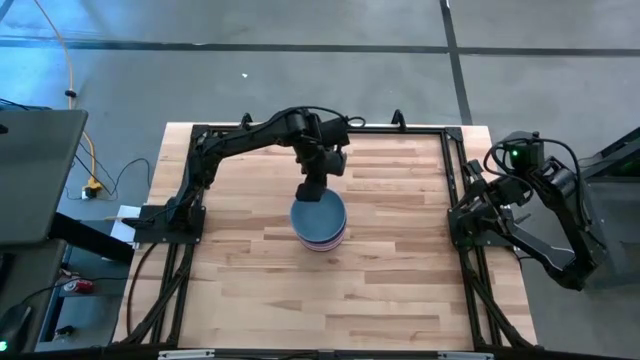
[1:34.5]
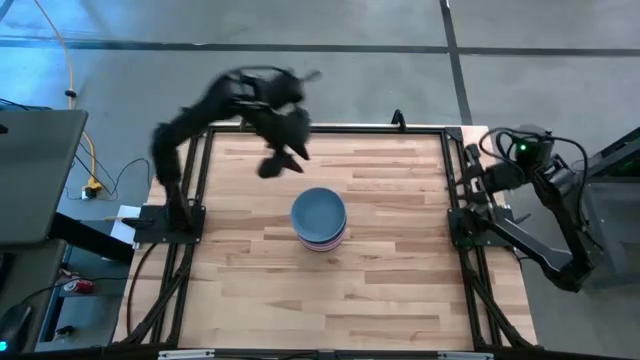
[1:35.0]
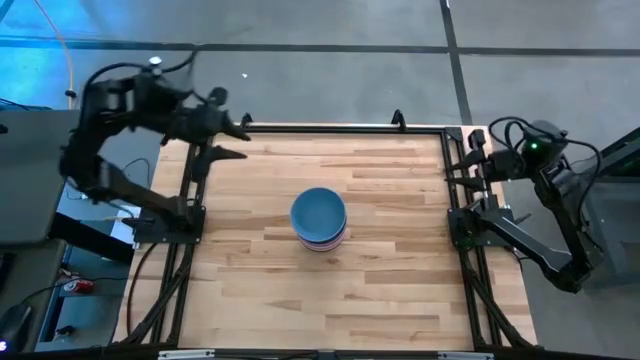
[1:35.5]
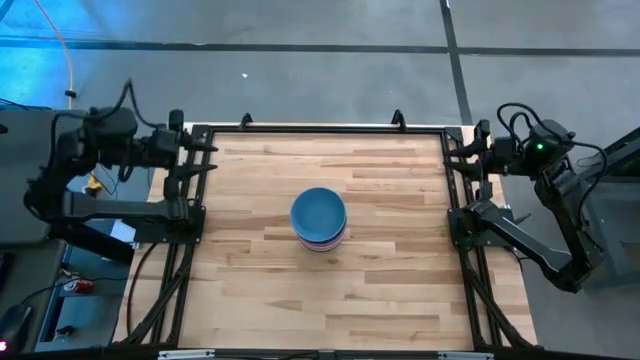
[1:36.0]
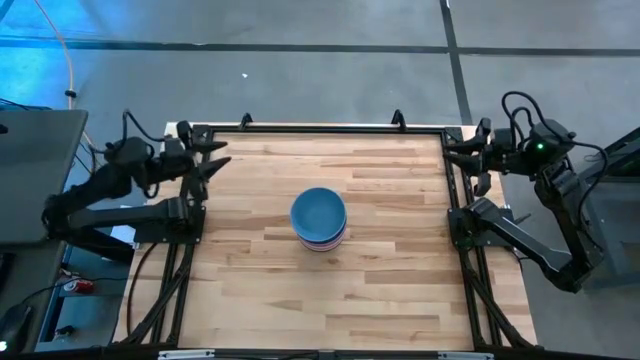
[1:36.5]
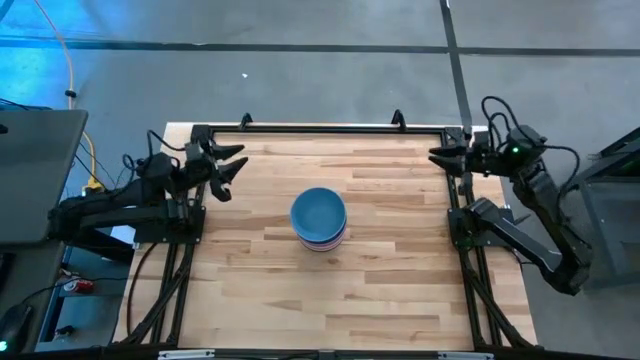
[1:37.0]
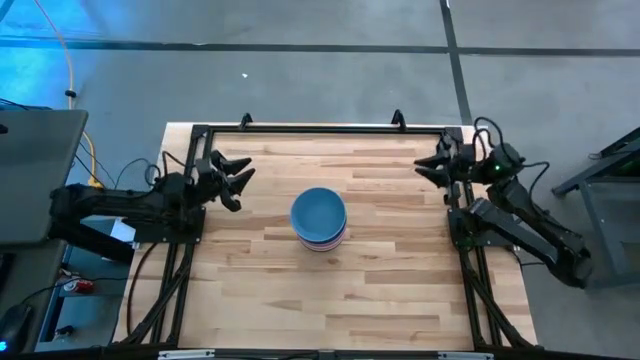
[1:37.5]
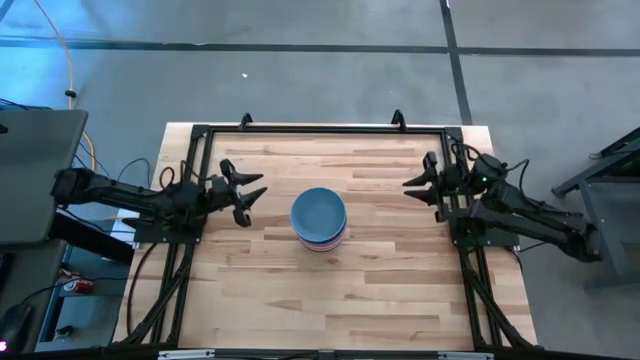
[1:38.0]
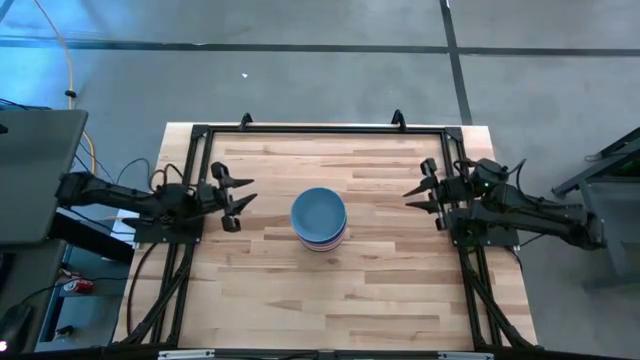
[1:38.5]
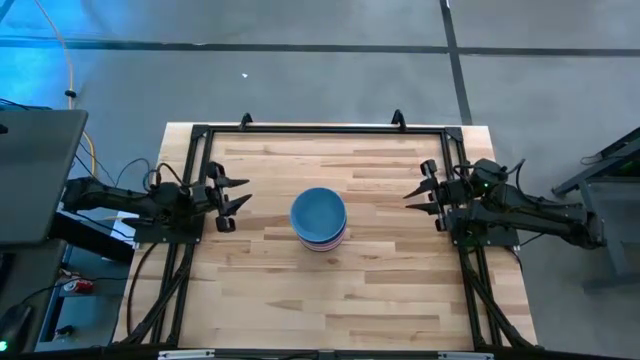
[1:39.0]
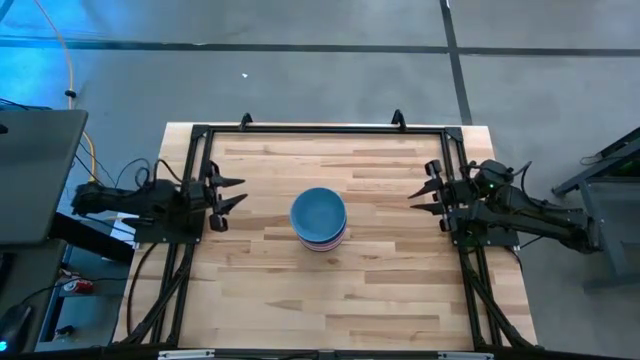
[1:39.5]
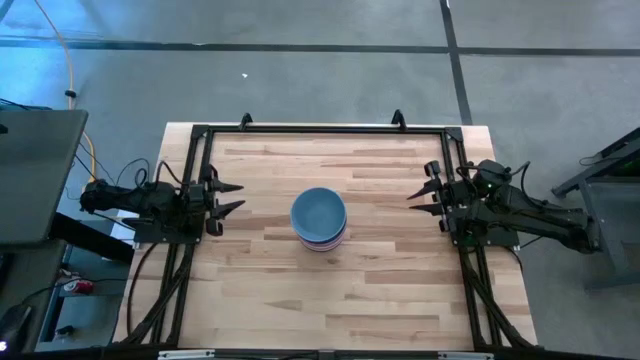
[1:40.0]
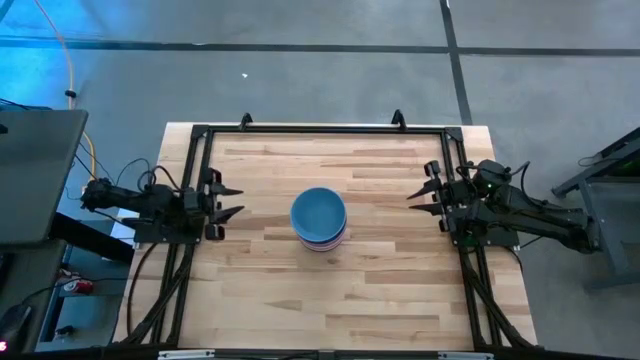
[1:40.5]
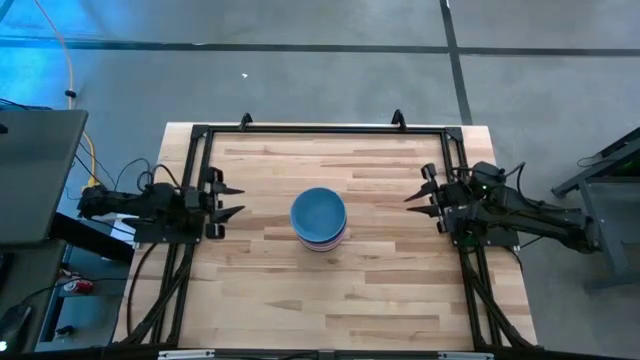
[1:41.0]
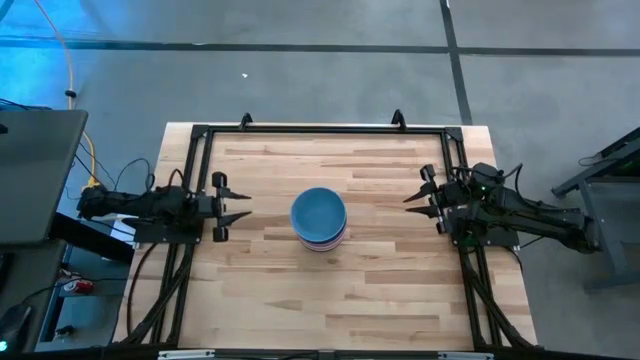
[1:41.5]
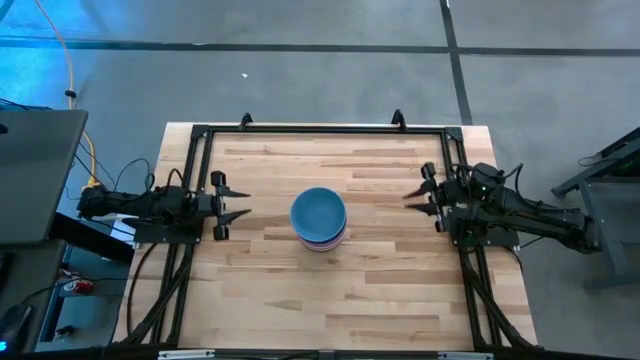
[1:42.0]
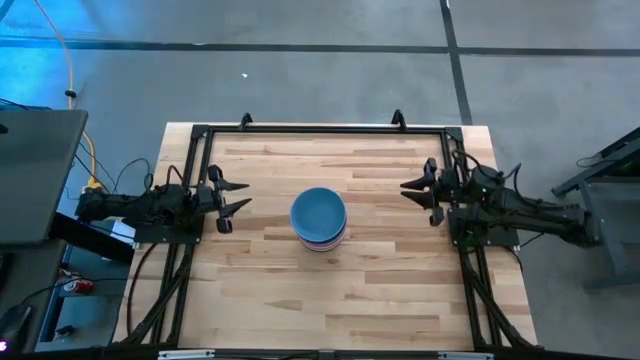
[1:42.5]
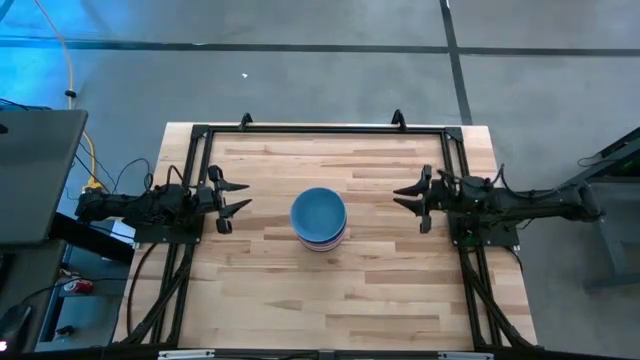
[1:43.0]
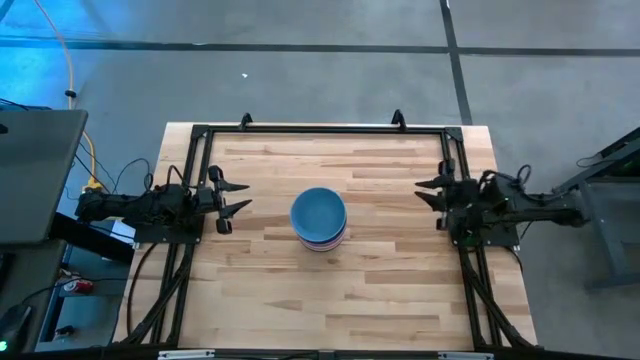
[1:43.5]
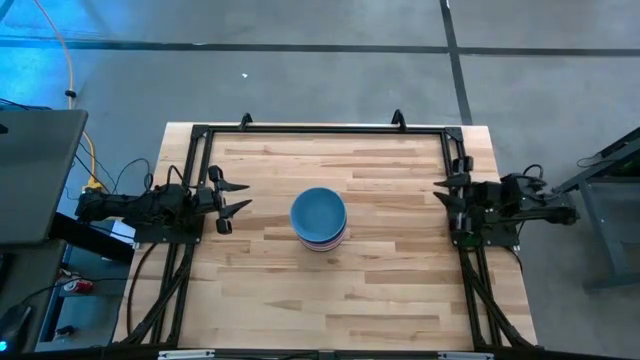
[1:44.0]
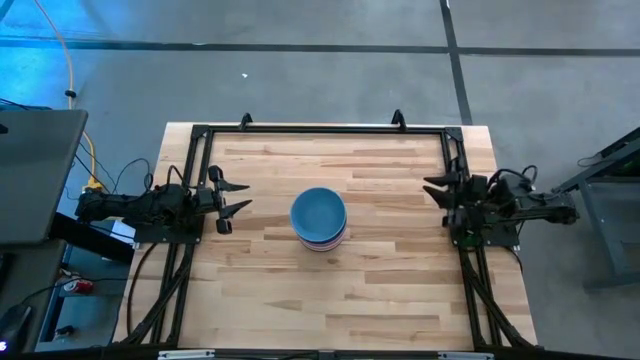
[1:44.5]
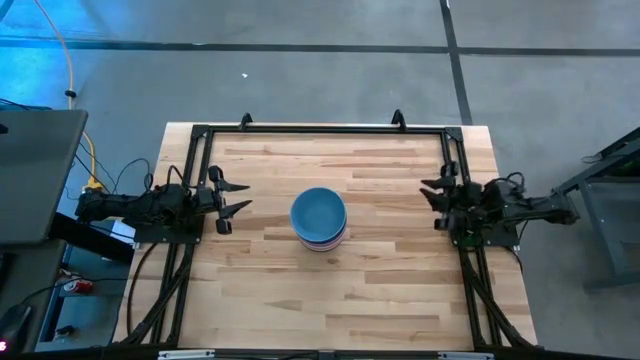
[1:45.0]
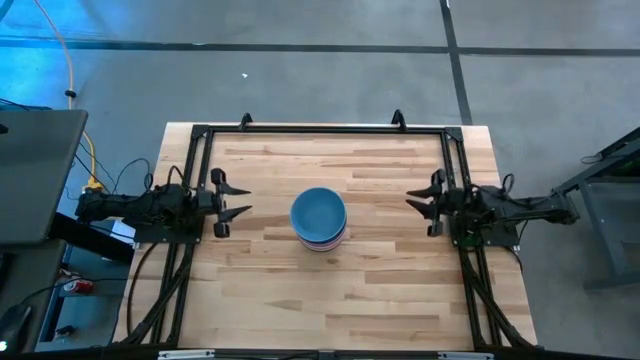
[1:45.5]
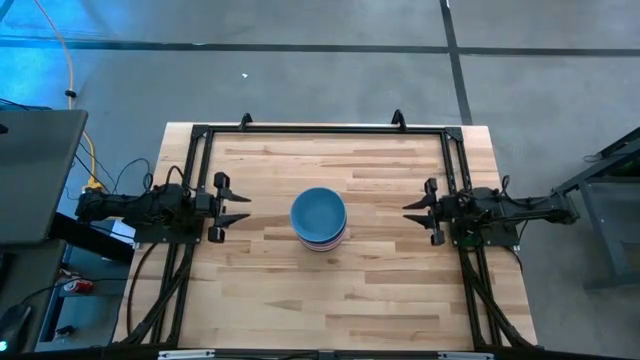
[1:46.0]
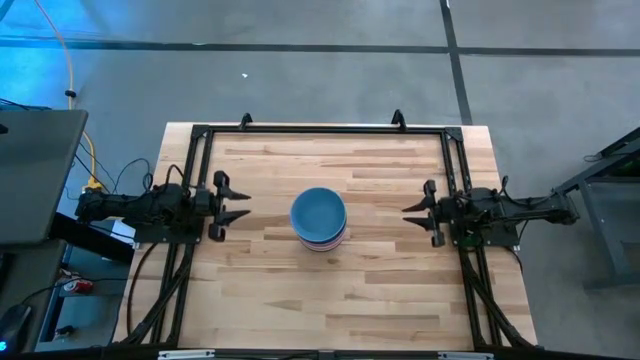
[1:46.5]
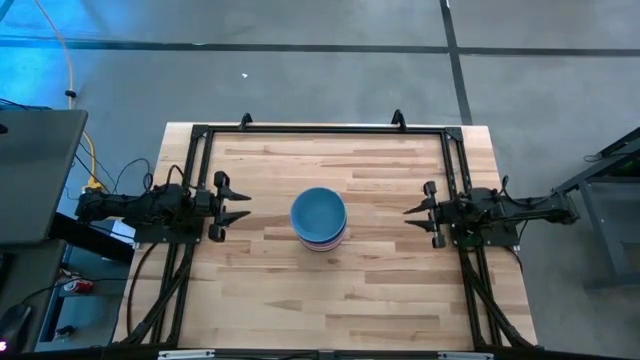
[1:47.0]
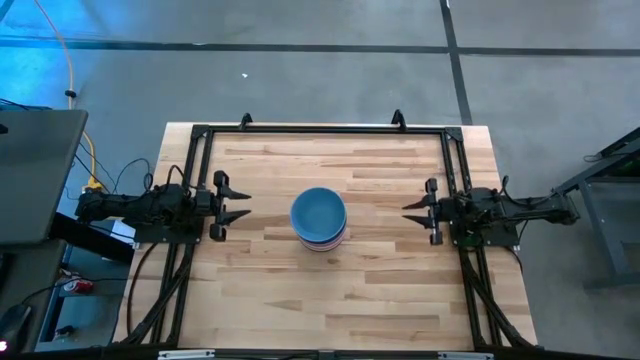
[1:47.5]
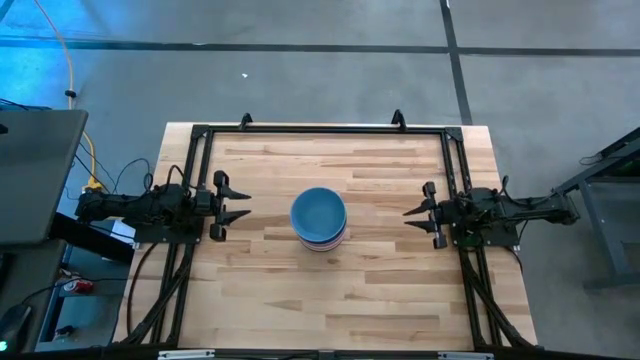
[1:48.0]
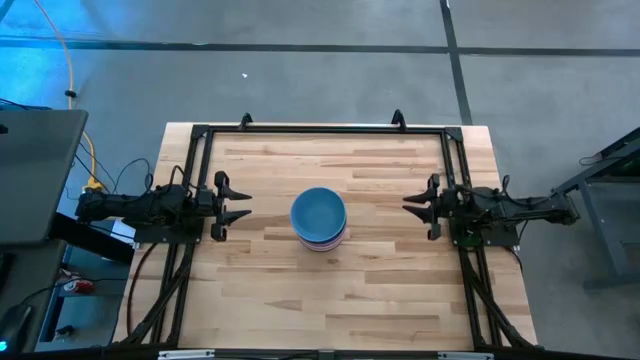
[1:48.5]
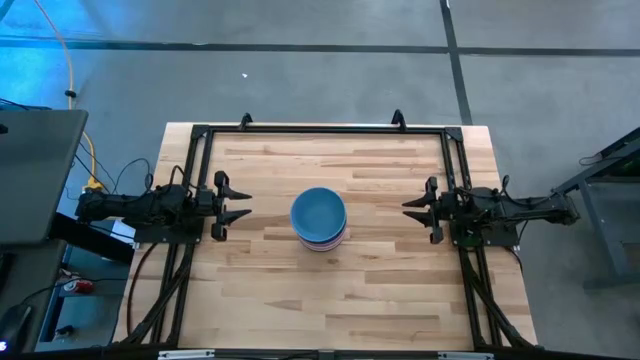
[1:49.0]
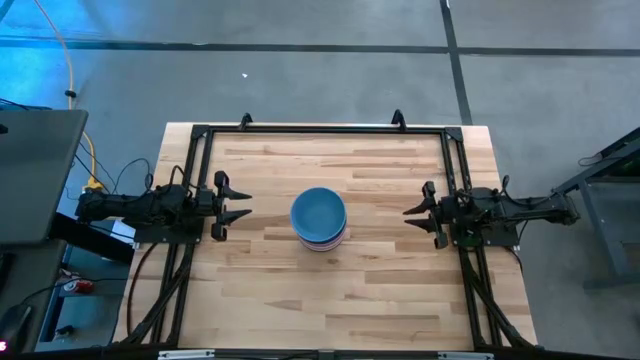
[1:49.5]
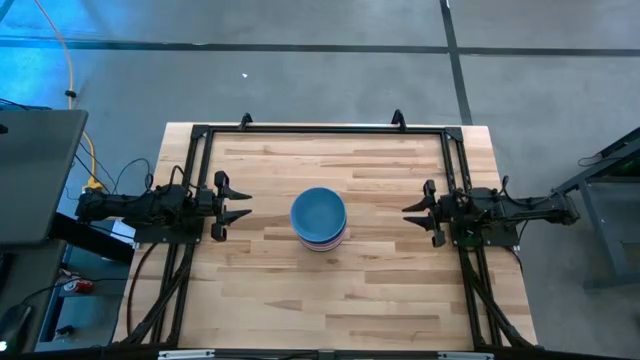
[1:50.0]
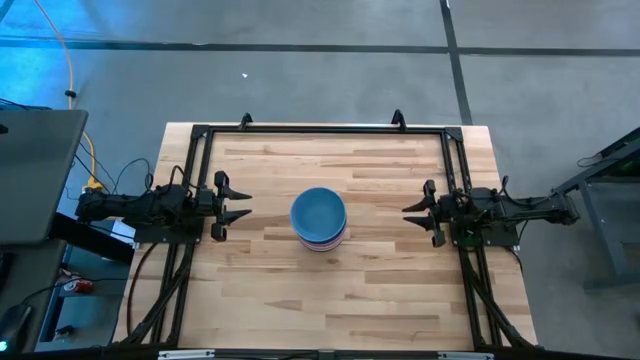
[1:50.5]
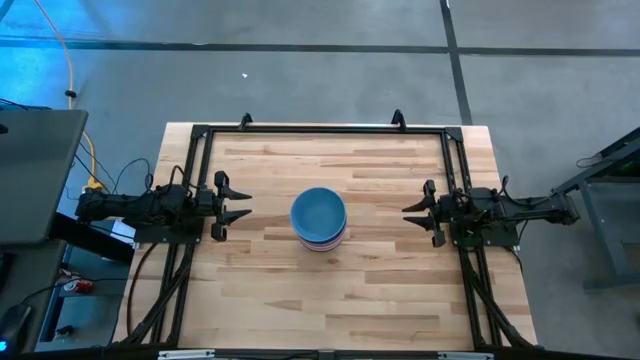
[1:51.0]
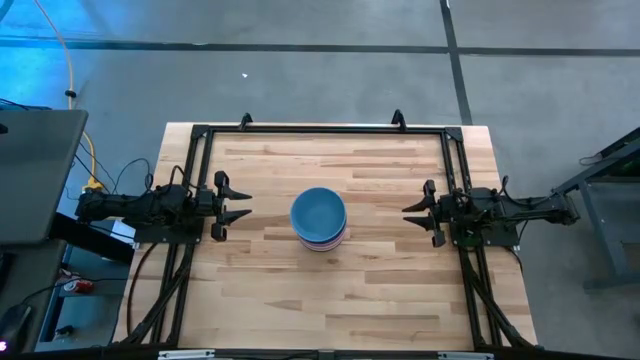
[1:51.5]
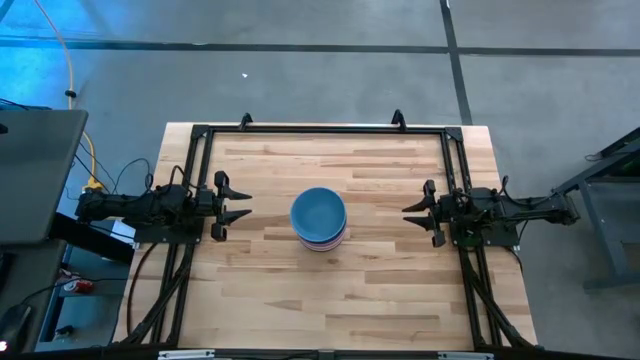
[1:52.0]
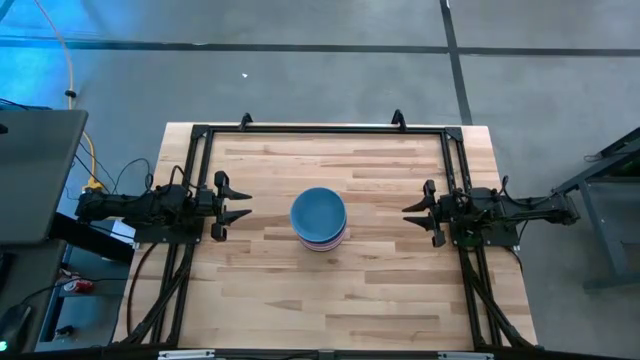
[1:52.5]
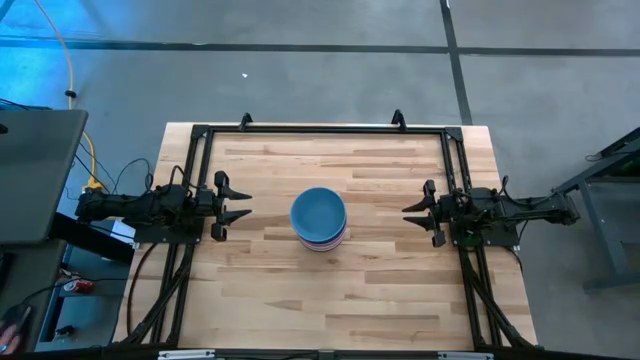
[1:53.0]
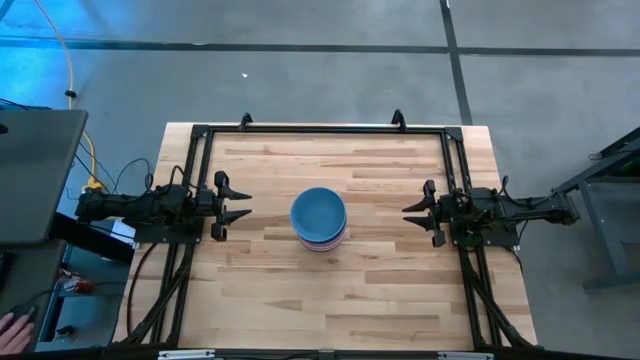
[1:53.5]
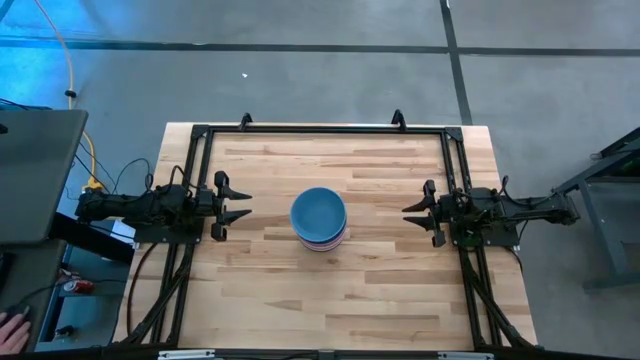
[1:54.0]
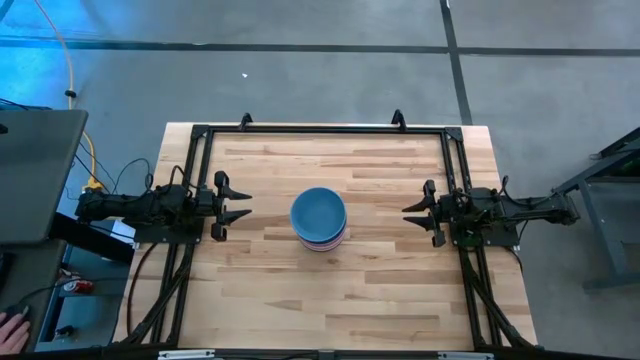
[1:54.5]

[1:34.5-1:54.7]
Task: Nest bowls inside each other
Return to Home Position

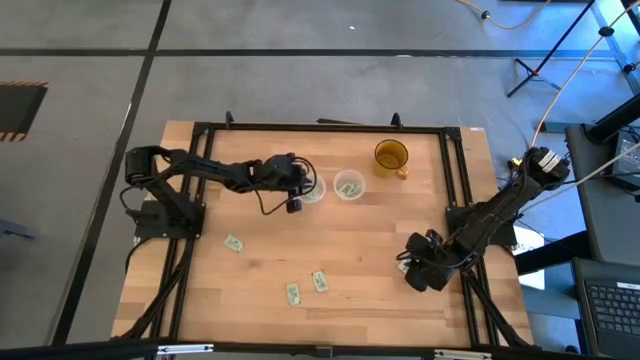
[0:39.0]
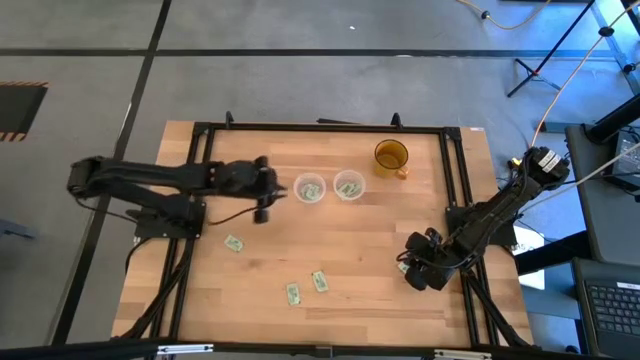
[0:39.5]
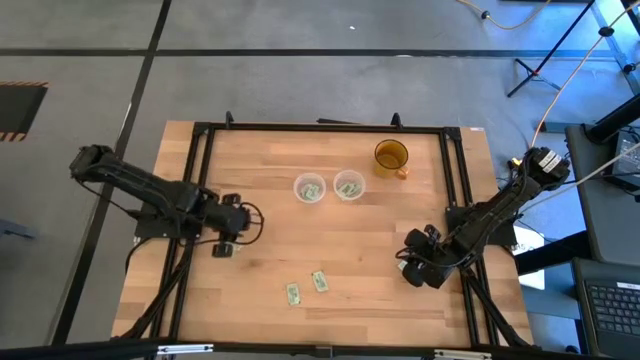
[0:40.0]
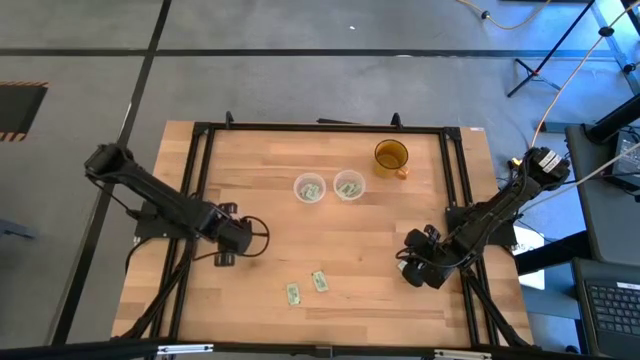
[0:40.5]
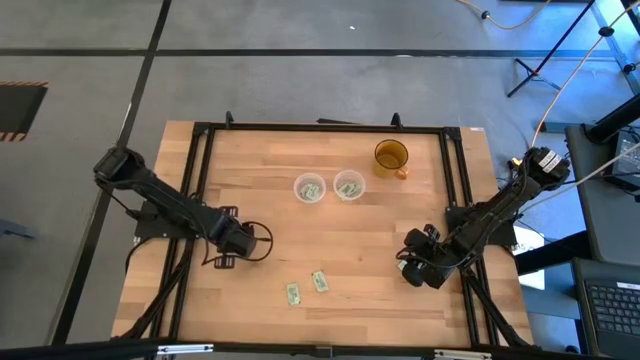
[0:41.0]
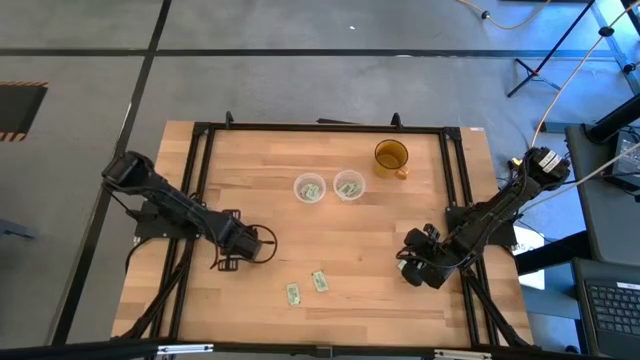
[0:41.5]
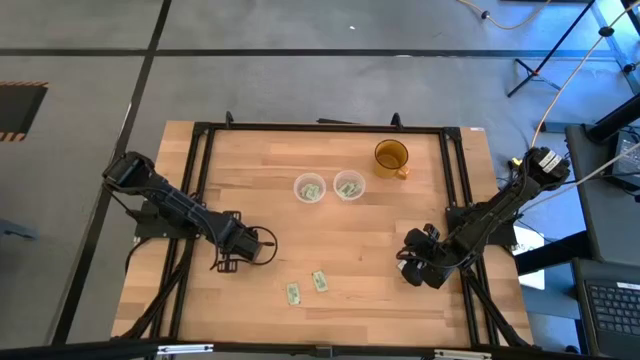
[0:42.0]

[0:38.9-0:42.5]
Task: Pick and place Stevia / Truvia into bins
Put the stevia packet into the left transparent container
